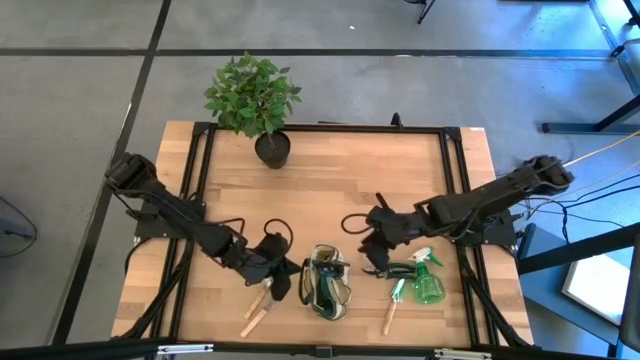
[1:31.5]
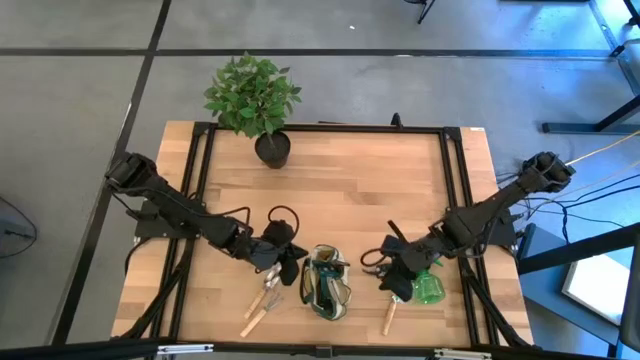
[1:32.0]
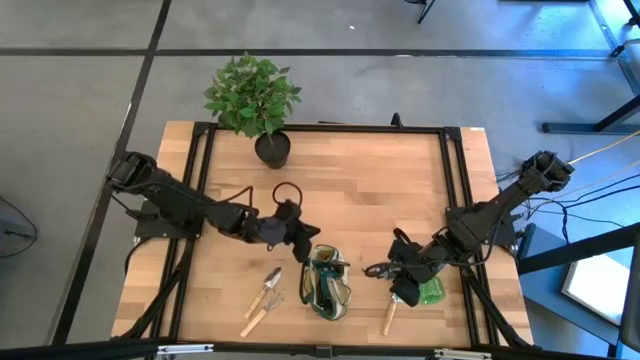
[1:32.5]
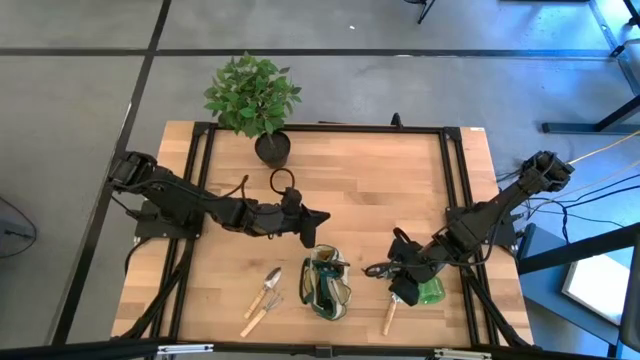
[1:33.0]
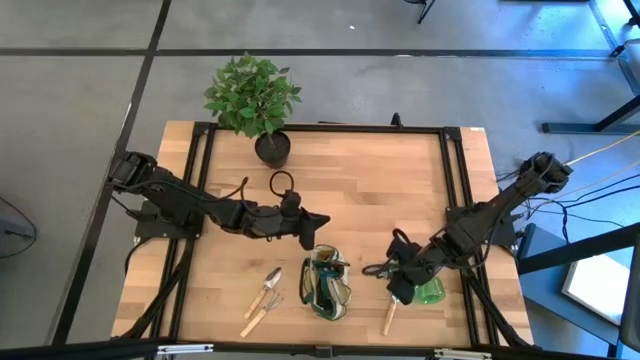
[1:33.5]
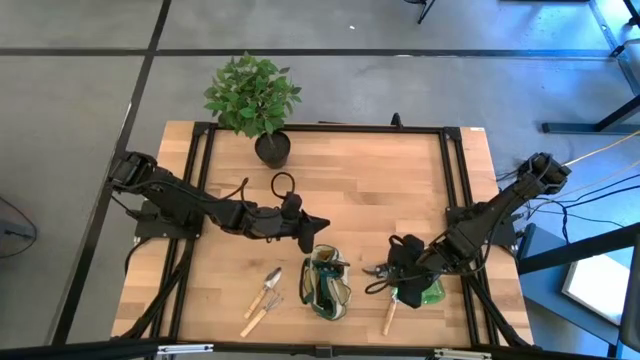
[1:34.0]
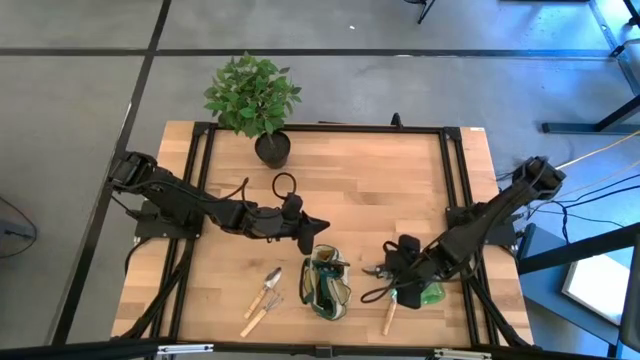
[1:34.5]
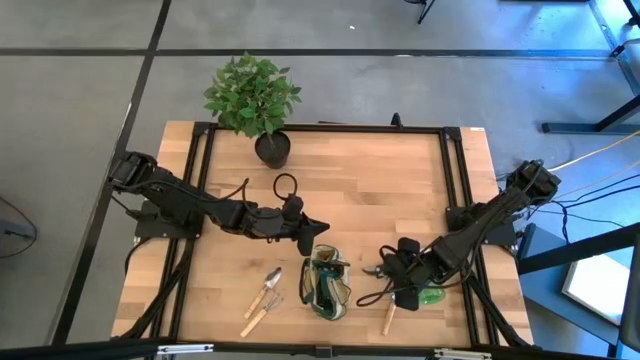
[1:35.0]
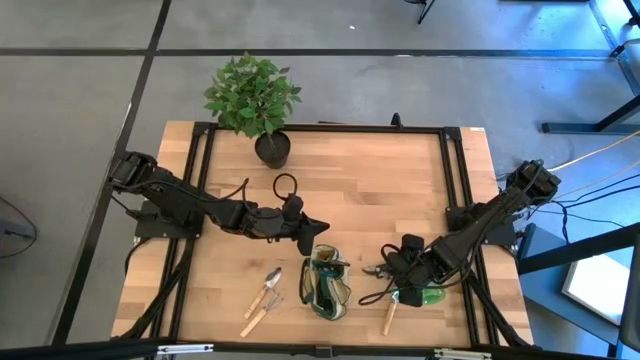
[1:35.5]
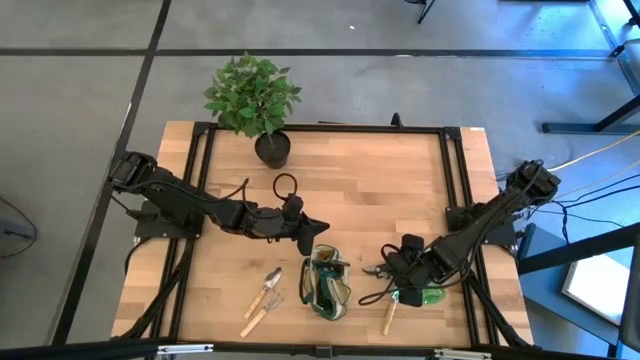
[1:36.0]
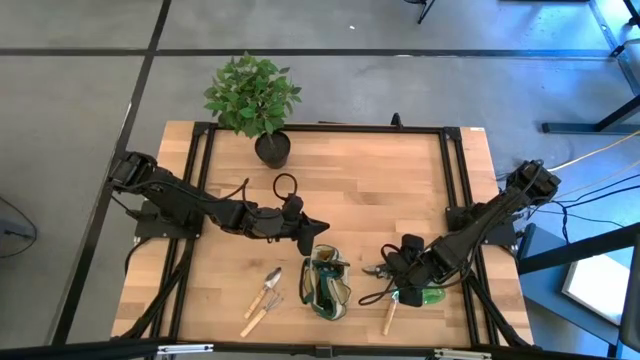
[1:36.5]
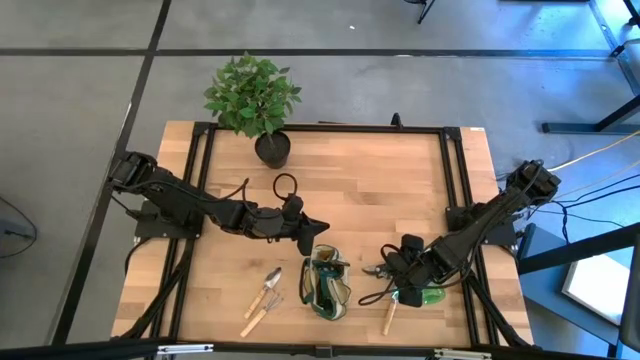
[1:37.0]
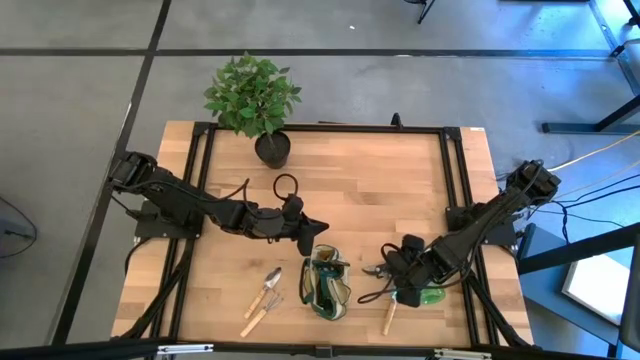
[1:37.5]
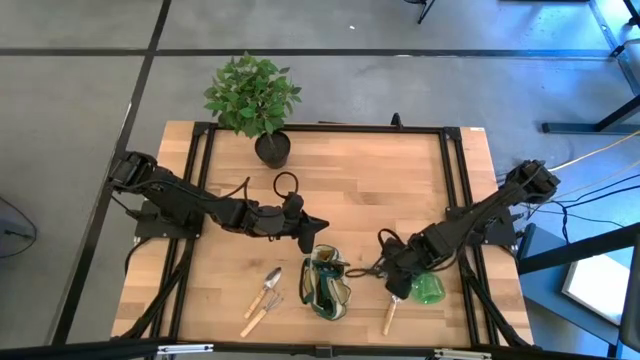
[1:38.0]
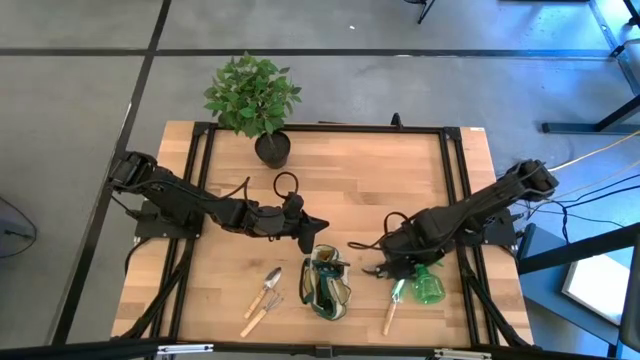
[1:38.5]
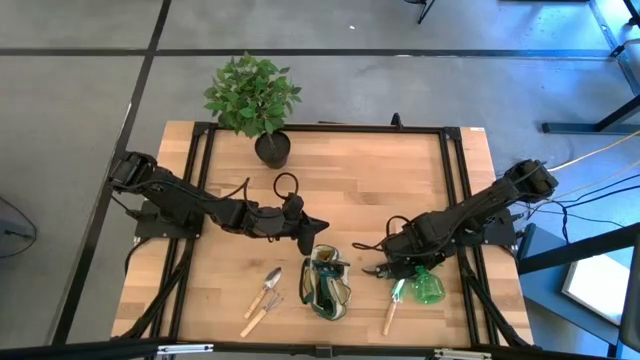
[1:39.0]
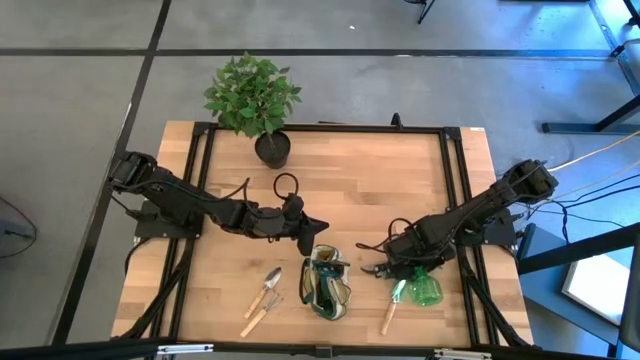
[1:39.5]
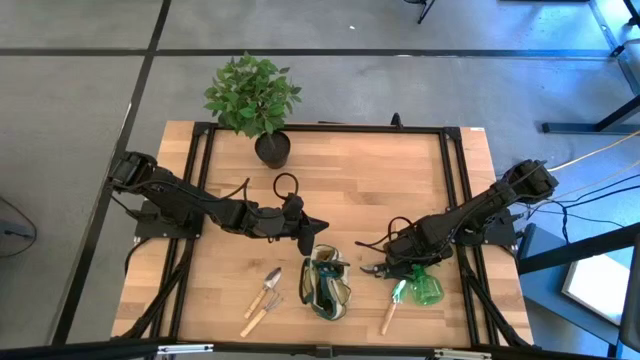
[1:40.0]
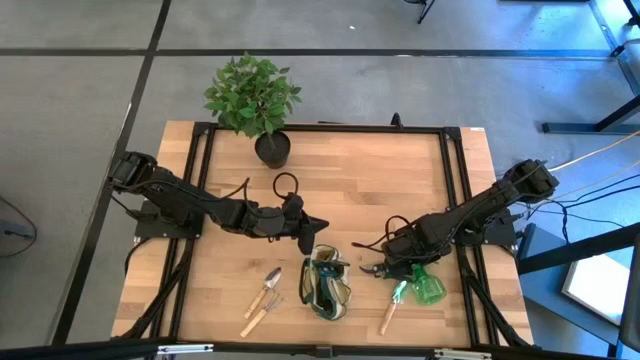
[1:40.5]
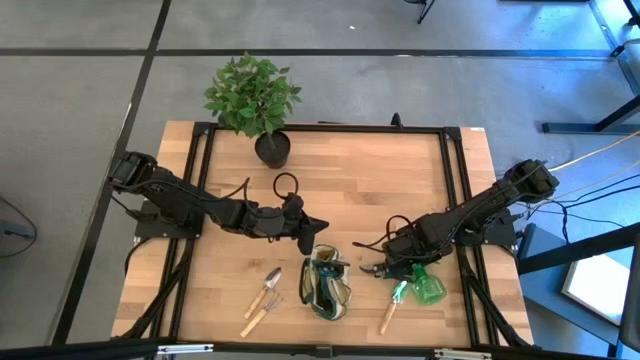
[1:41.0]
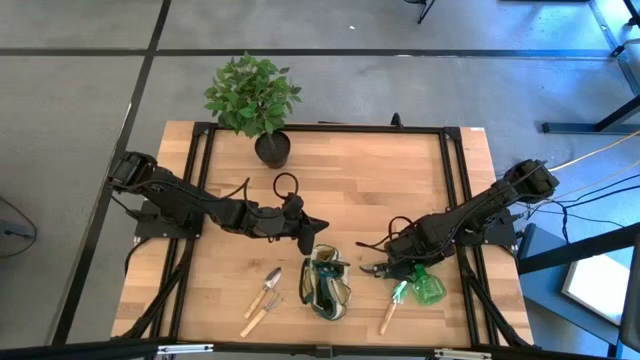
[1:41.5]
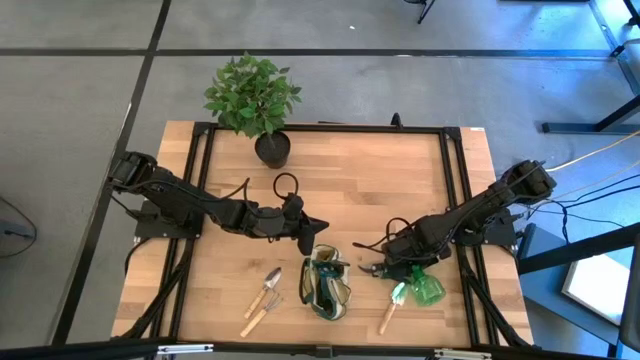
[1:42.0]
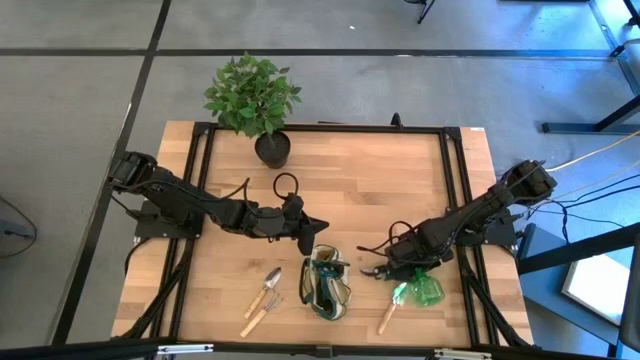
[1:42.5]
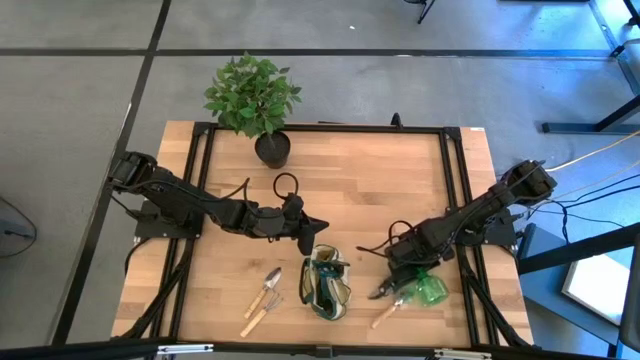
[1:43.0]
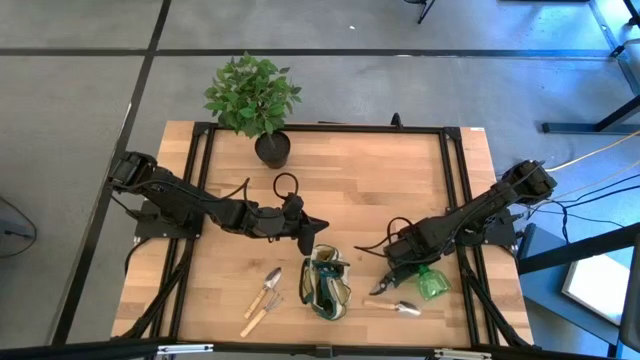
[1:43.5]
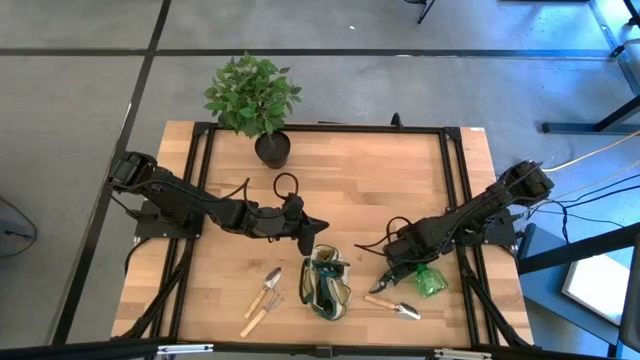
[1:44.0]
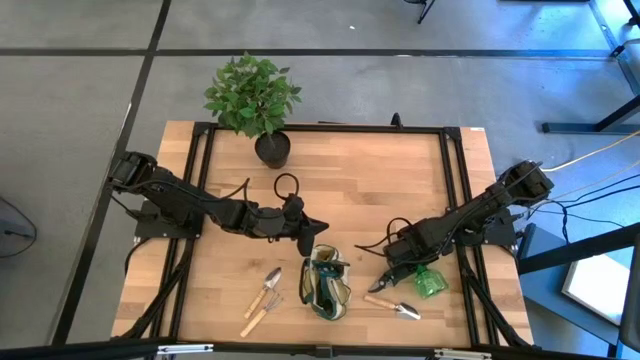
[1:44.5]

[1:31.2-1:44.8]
Task: Pick & Place Garden tools in Gardening bag
Put the green spray bottle into the brown gardening bag

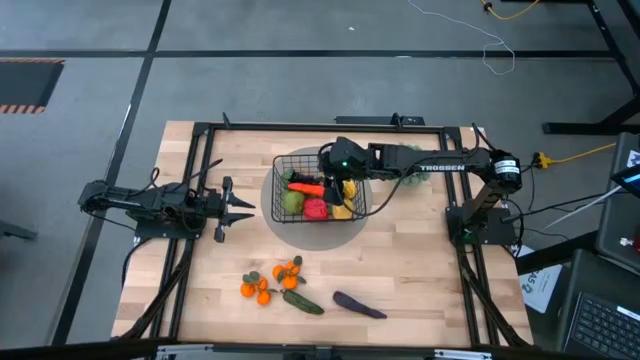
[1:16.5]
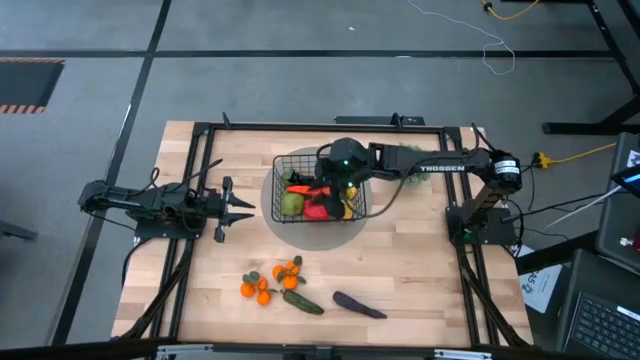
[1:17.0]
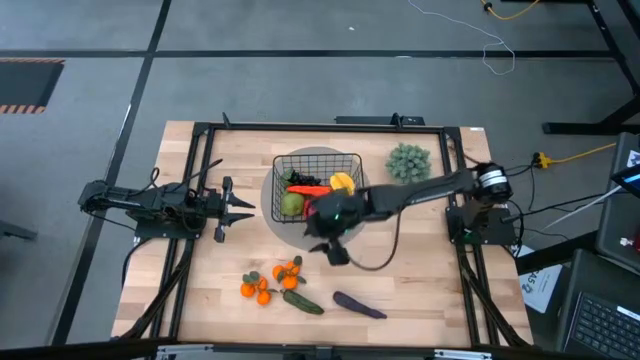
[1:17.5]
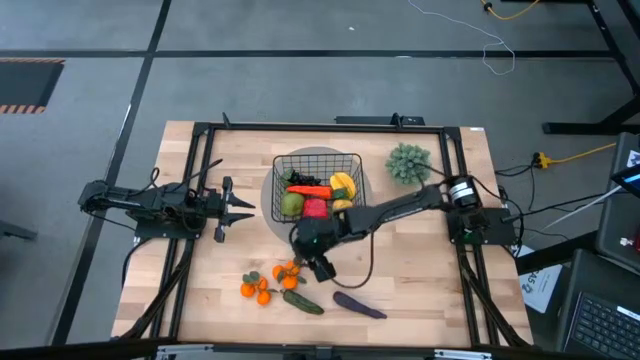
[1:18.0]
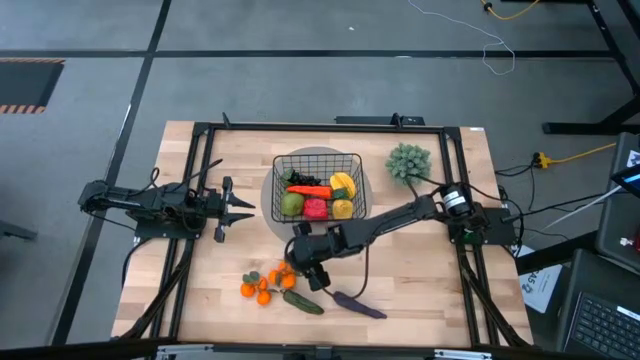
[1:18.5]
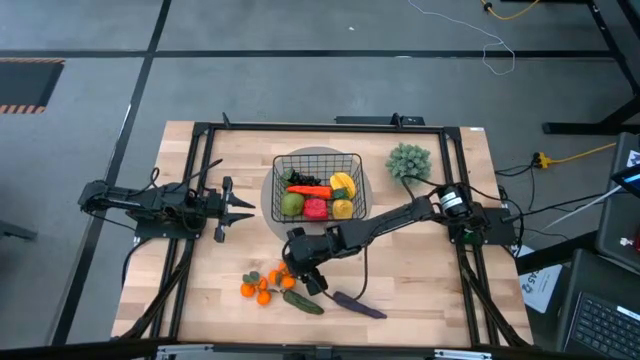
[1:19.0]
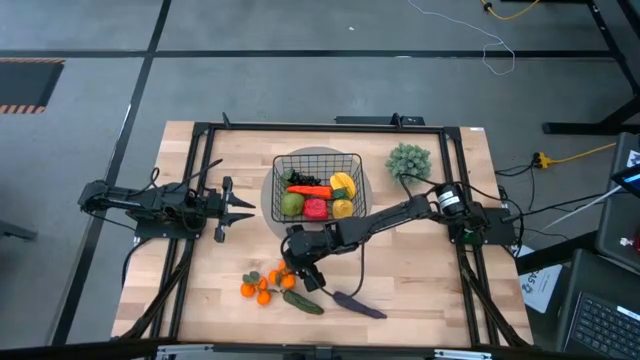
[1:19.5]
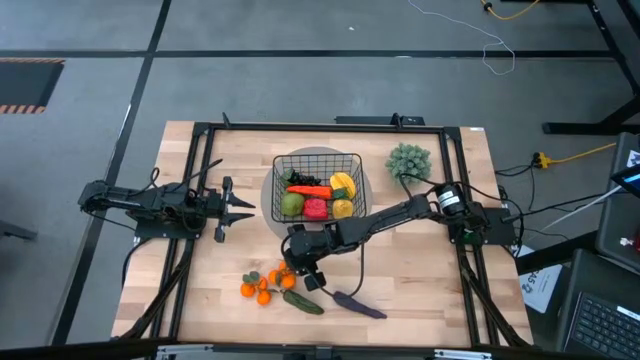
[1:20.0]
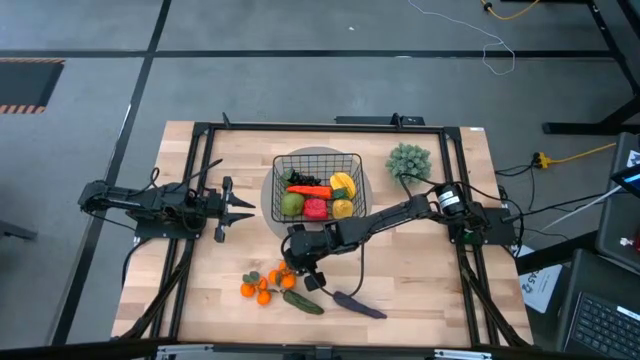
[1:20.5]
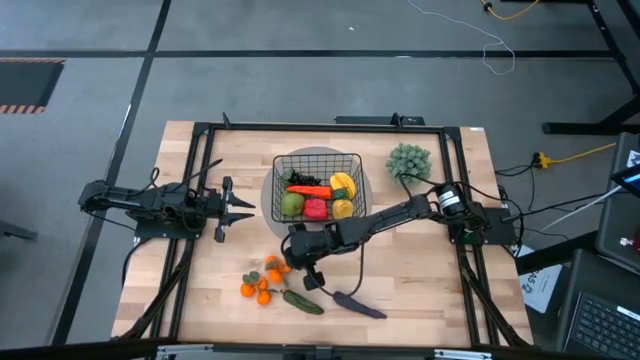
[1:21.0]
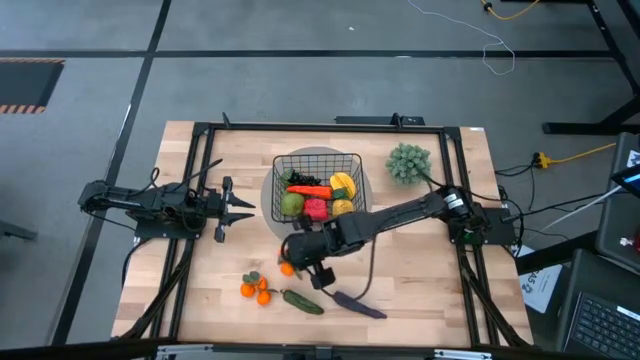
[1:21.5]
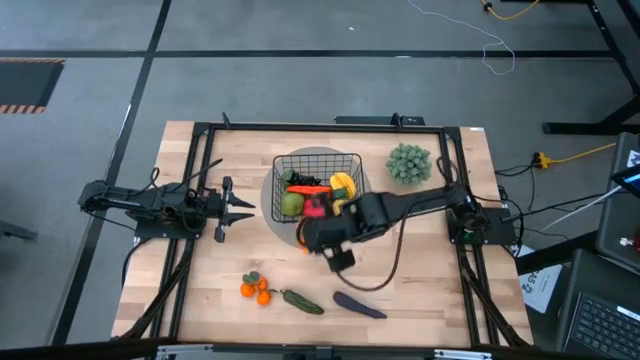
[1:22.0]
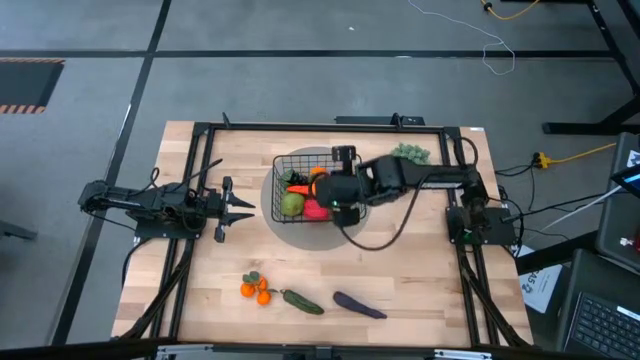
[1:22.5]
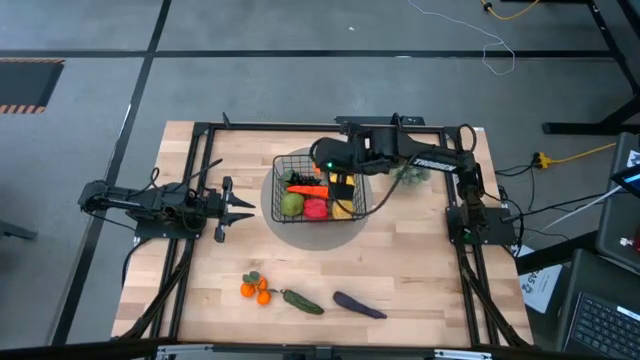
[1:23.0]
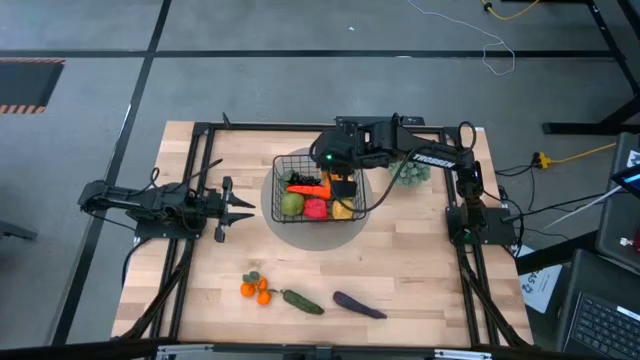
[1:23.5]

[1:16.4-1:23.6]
Task: Build produce basket
Put the right tangerine into the black wire basket
